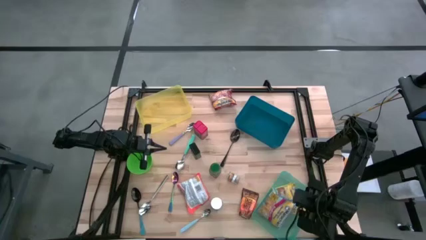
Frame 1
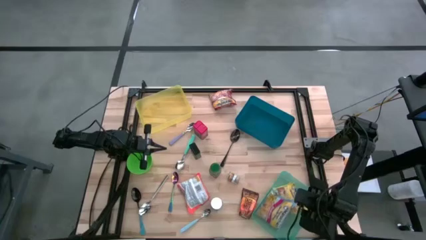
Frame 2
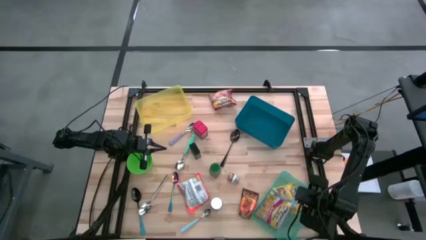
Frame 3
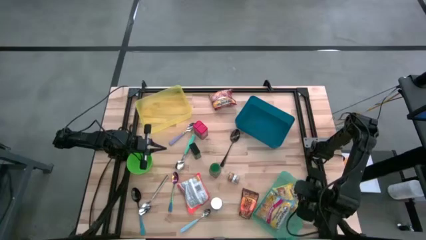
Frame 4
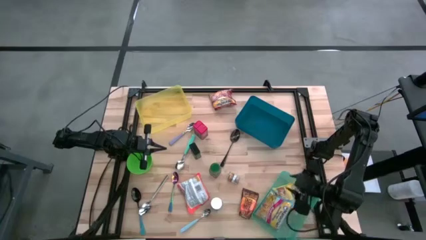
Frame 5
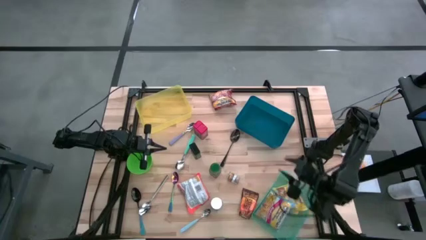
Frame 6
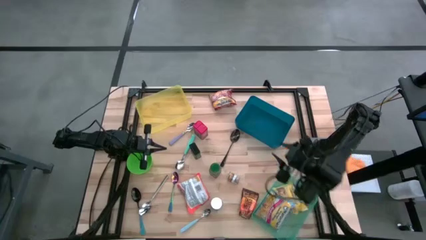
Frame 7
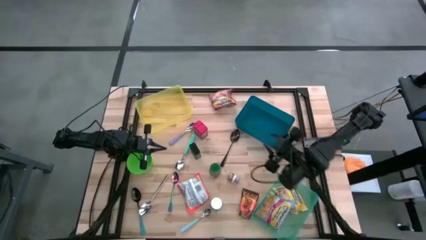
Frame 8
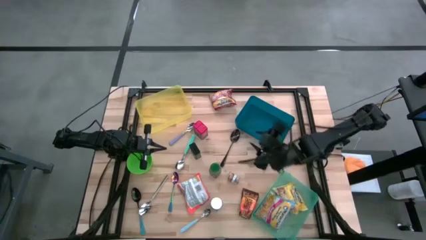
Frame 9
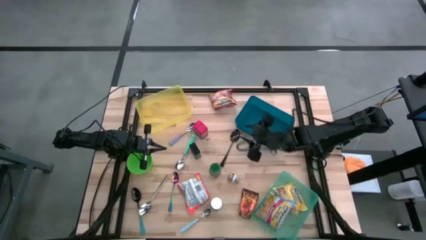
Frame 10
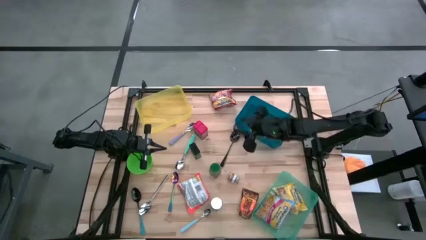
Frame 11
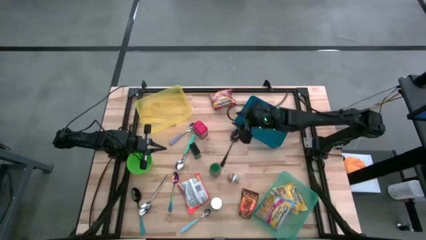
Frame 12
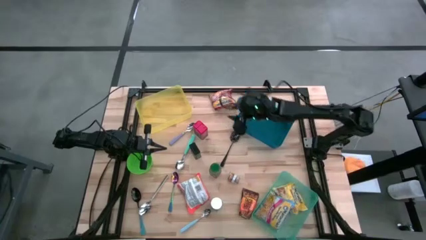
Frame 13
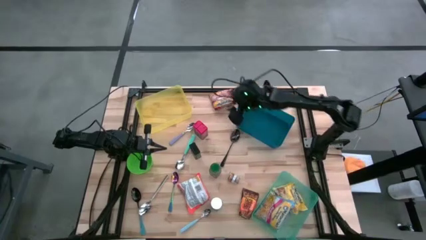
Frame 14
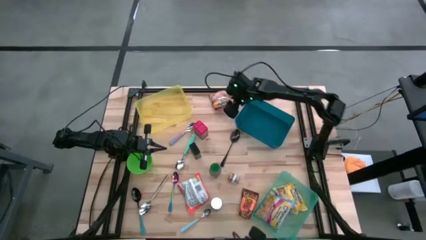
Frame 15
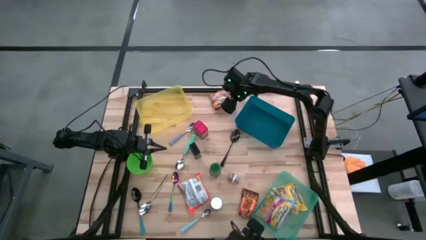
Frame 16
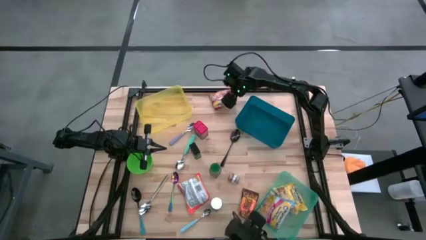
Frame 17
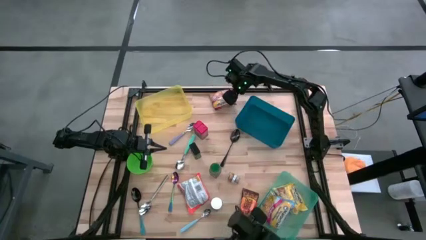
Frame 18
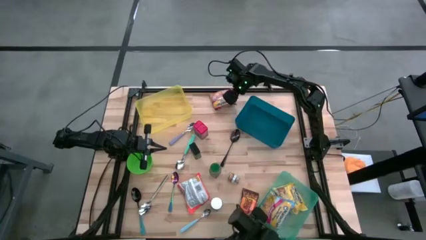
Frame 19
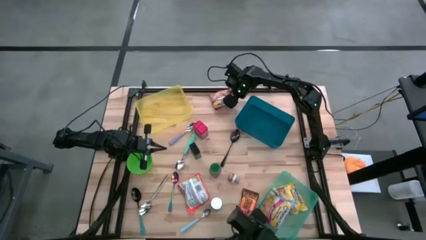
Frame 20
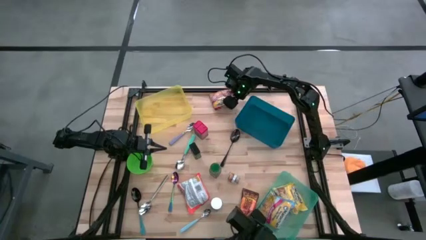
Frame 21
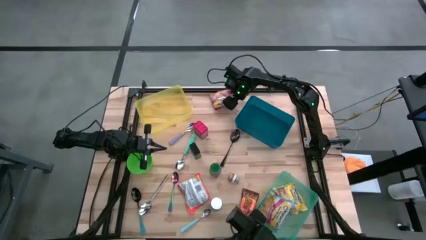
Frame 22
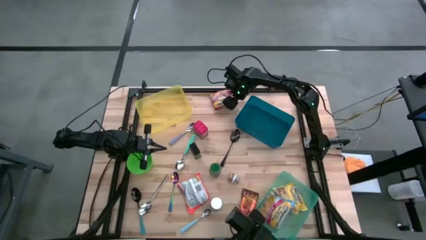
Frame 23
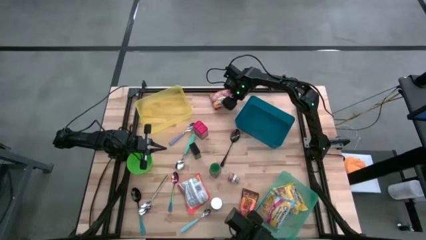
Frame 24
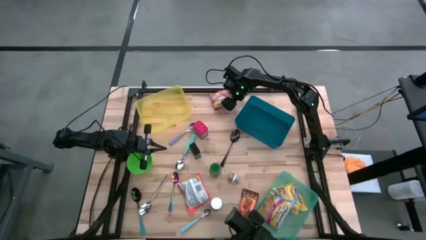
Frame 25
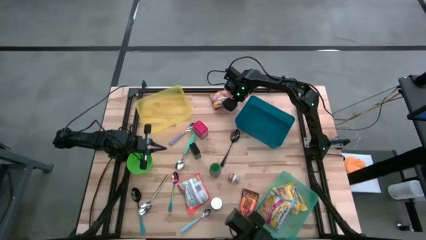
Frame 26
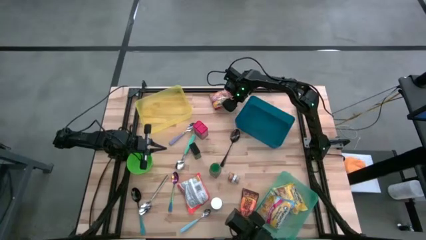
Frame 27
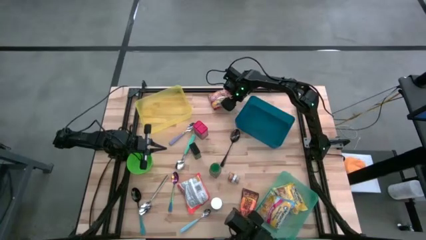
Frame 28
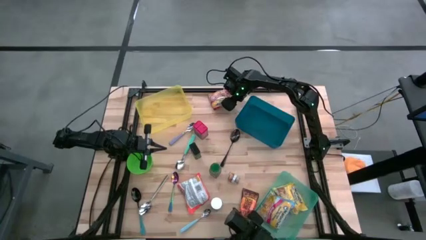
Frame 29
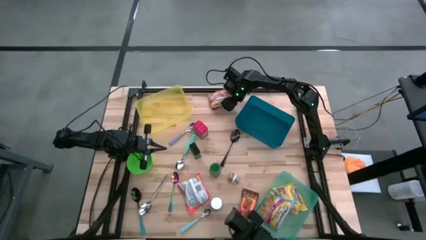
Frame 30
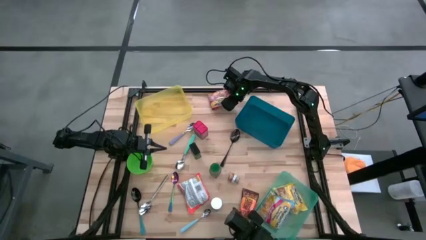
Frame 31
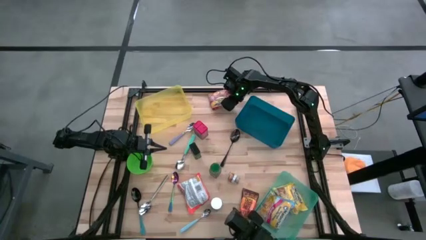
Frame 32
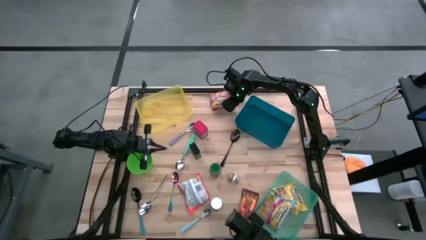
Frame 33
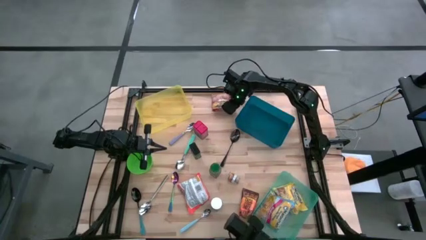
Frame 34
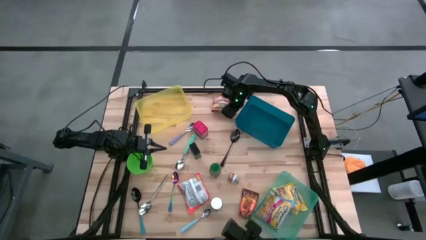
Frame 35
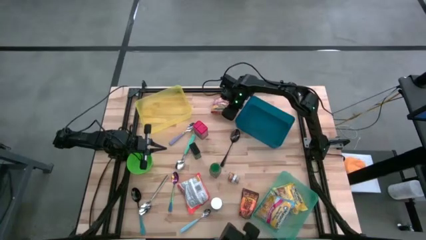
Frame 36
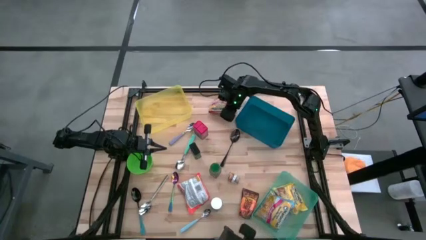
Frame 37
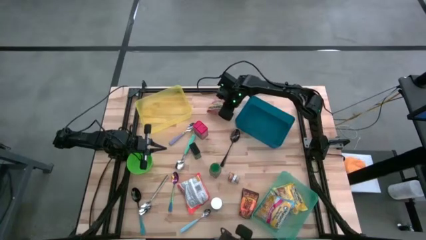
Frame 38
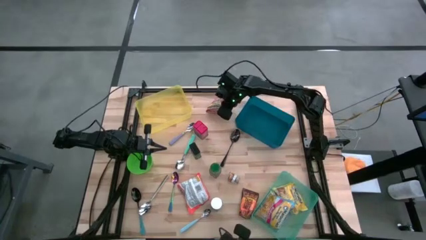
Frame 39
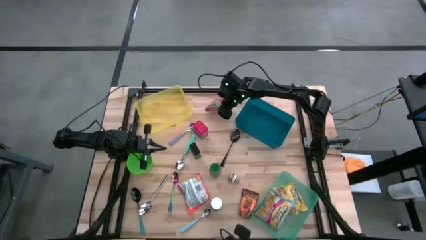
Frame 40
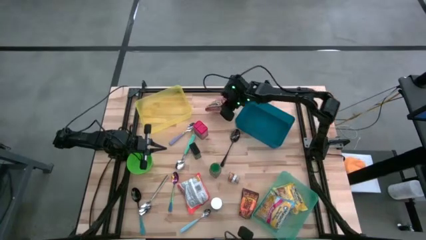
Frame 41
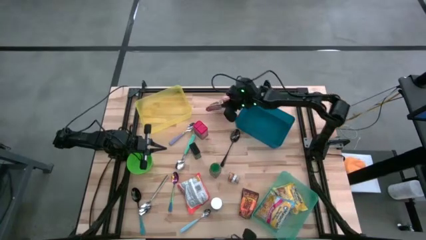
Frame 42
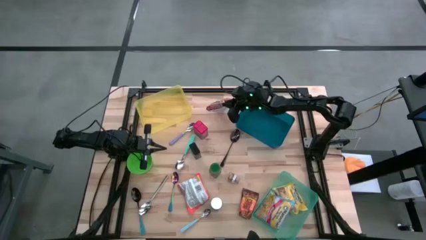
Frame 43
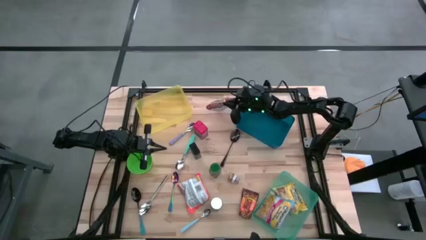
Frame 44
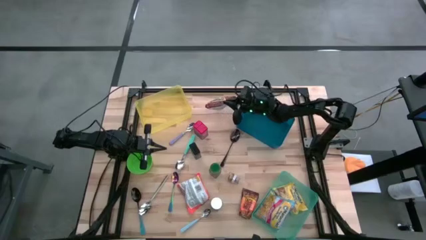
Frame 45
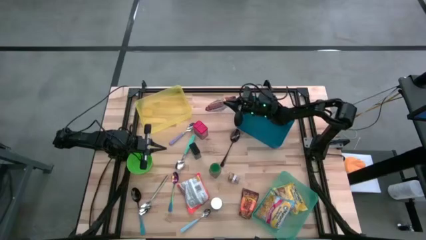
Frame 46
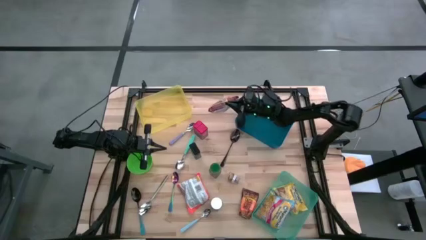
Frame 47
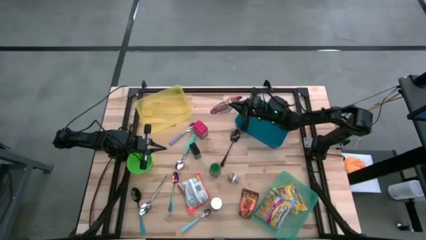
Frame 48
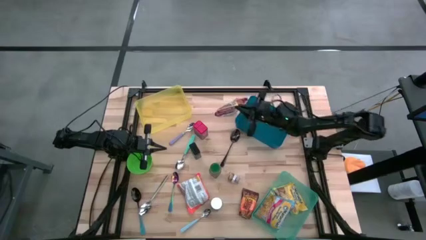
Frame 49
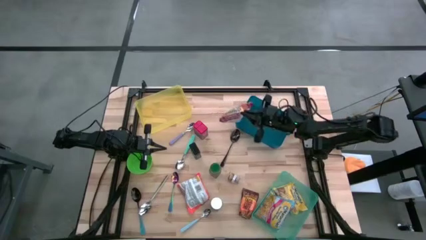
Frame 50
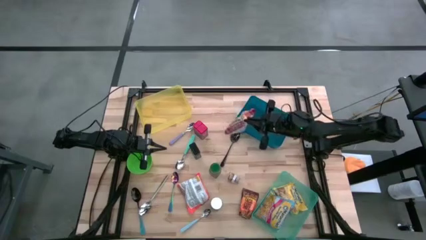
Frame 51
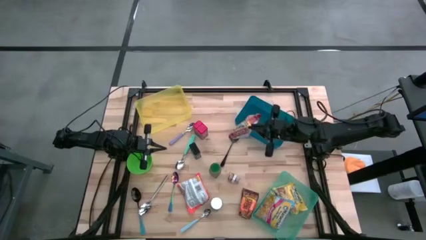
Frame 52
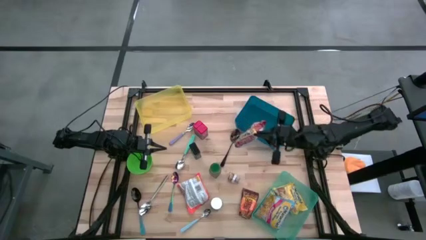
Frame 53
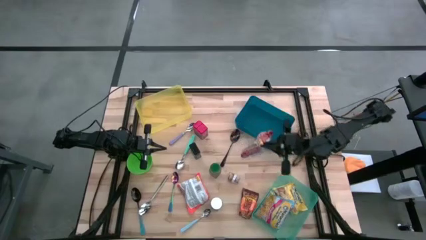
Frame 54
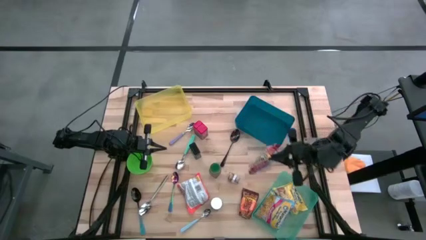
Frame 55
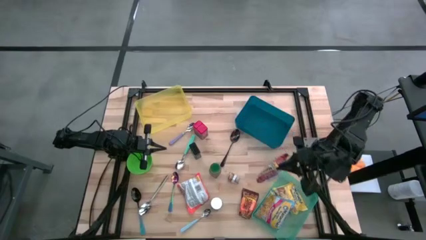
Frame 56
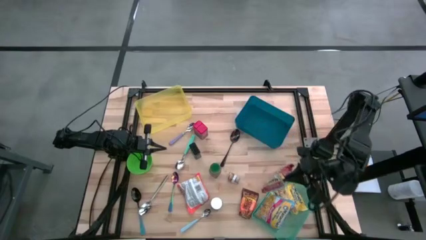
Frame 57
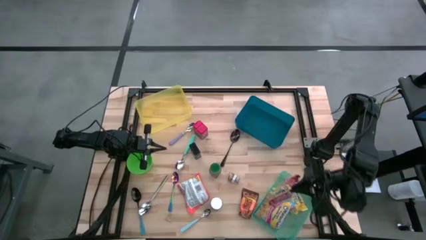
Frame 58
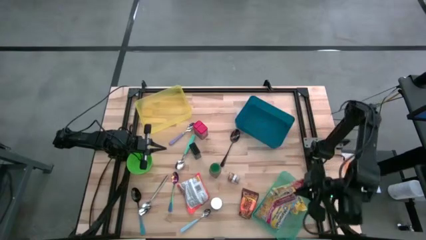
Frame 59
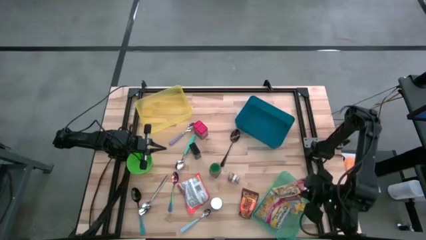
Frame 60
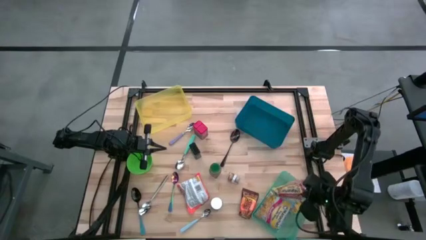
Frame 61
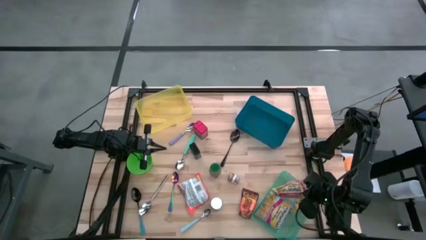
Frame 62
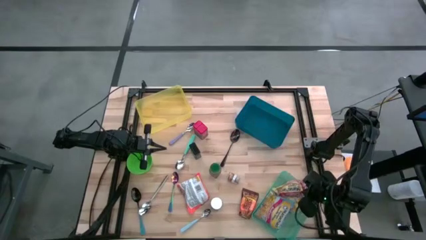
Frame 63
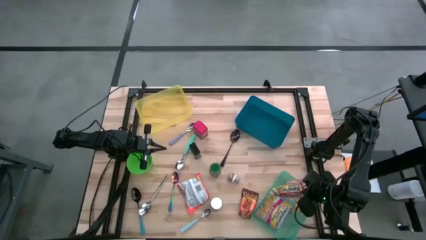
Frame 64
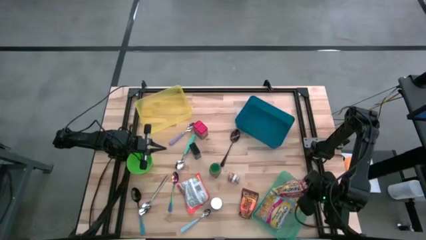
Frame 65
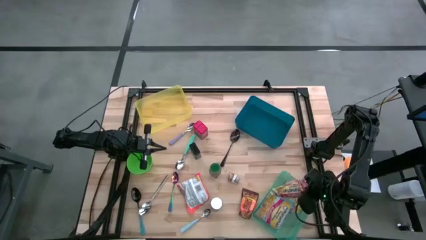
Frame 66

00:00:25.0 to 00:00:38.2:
Put the red noodle pack into the green bin

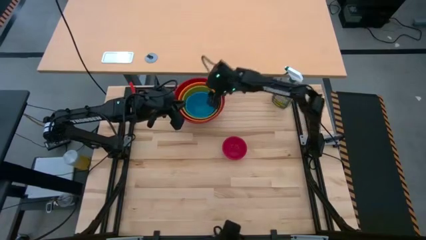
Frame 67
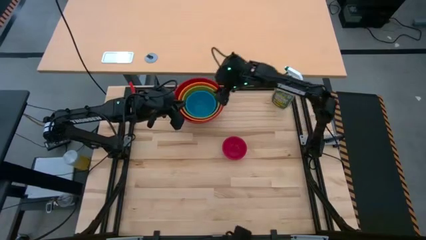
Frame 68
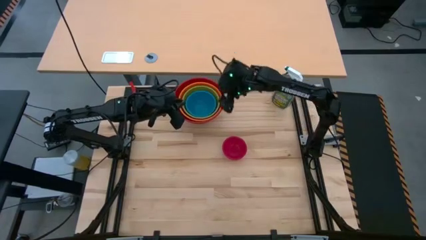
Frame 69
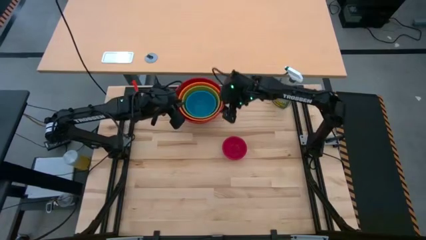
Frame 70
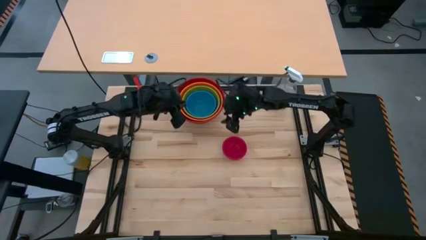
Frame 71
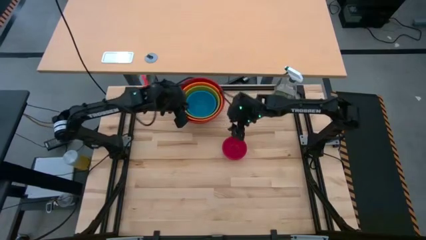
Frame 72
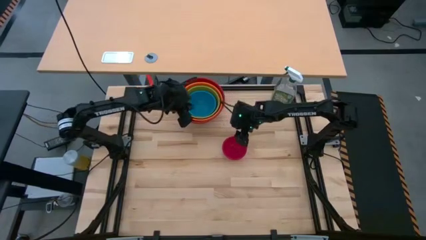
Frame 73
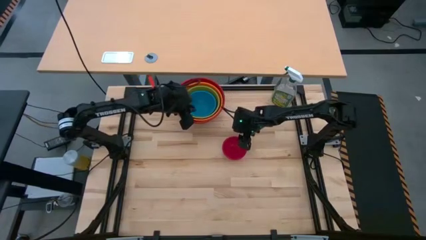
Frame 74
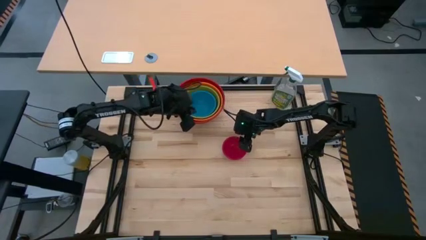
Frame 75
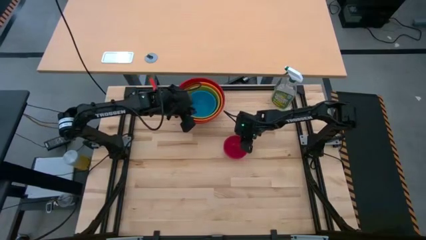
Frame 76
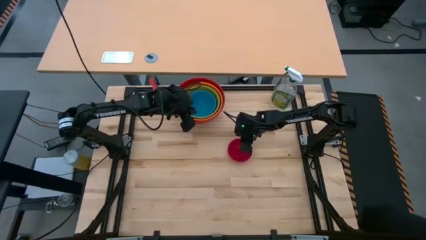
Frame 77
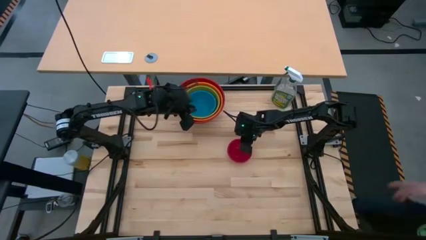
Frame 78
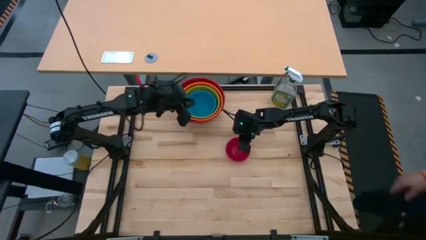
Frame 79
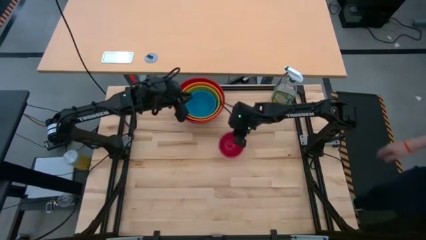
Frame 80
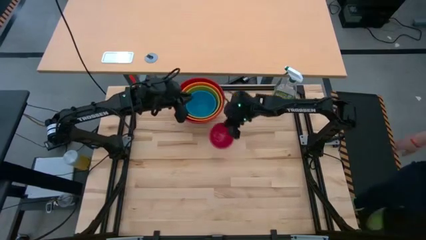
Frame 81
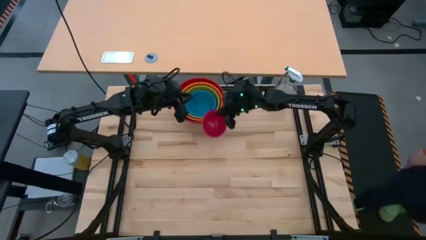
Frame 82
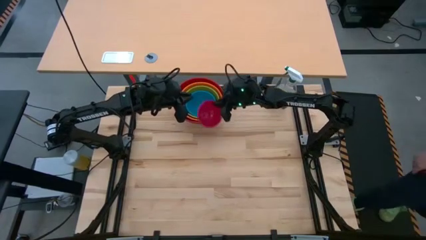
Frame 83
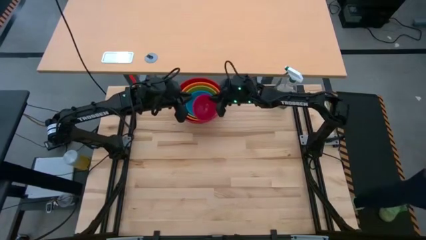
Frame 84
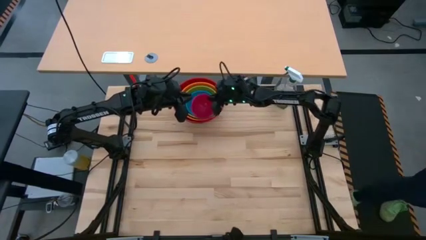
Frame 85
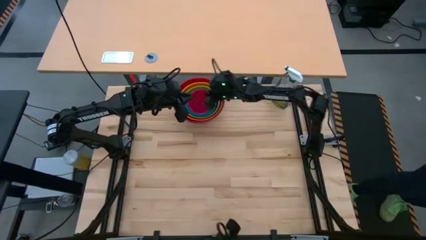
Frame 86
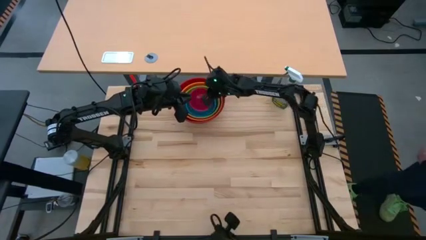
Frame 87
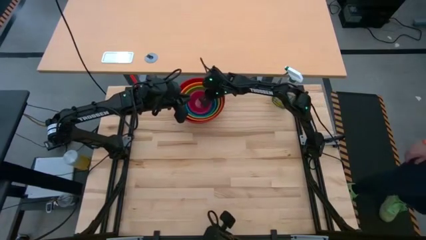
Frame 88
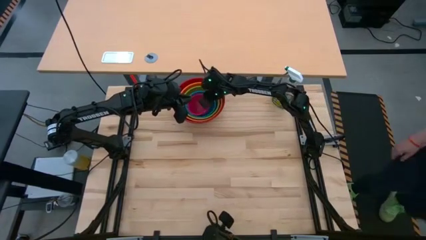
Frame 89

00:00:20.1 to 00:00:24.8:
Stack the pink bowl on the blue bowl
